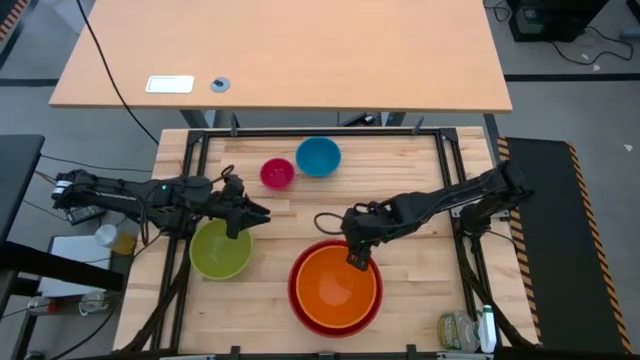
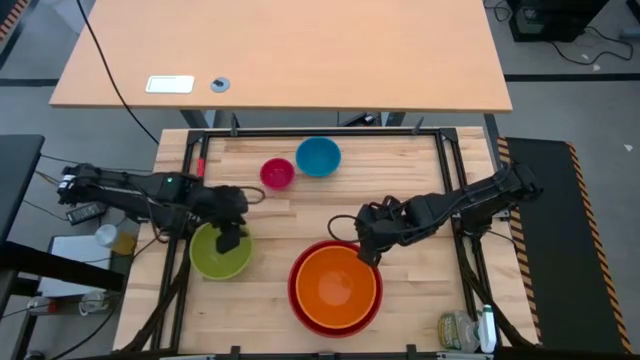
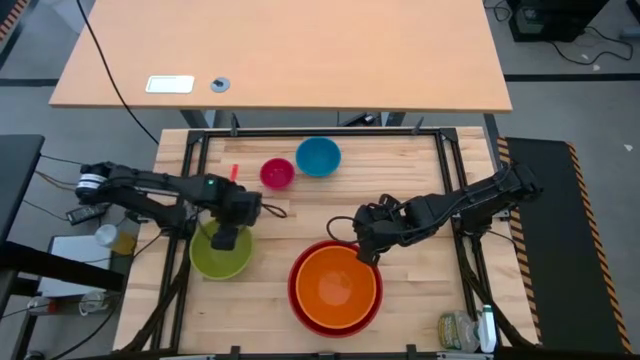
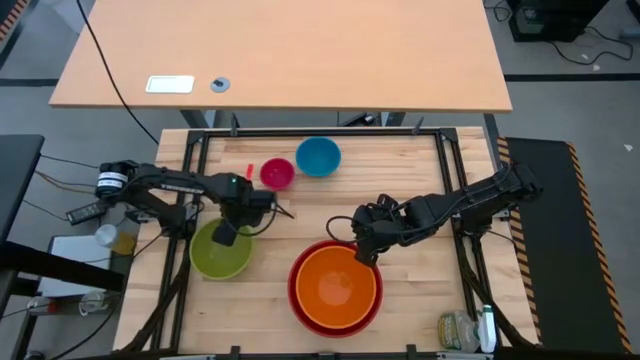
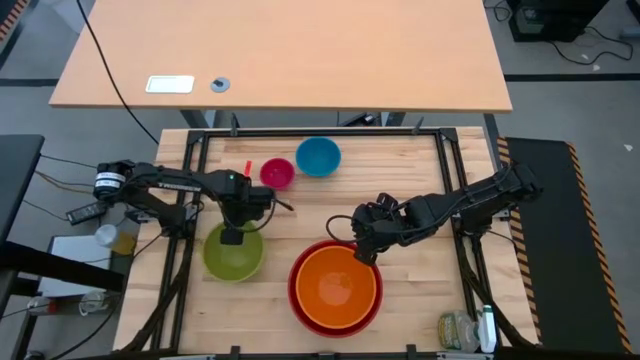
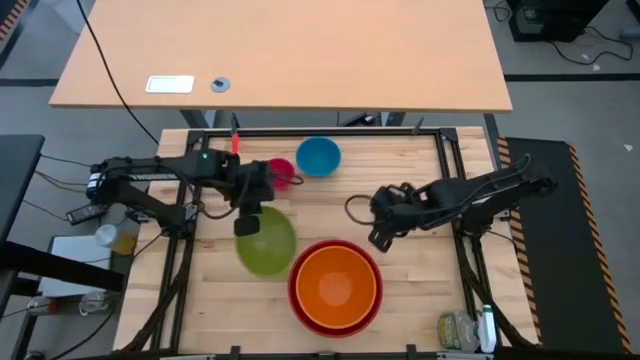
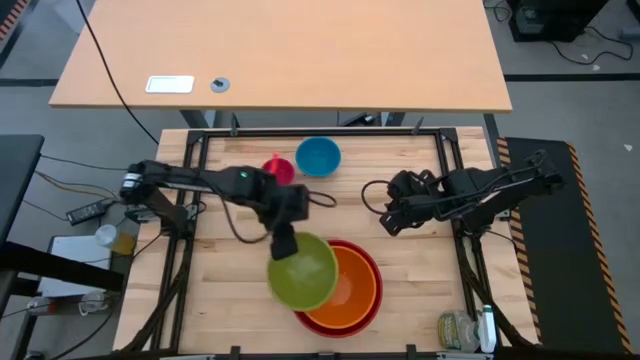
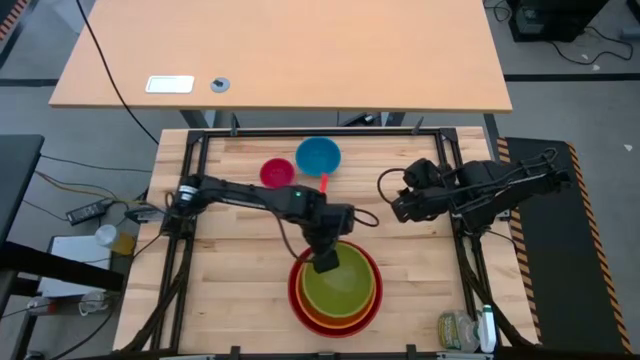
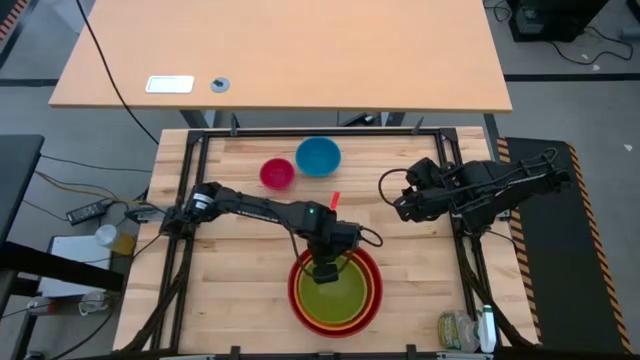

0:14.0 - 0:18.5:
Stack the green bowl on top of the orange bowl

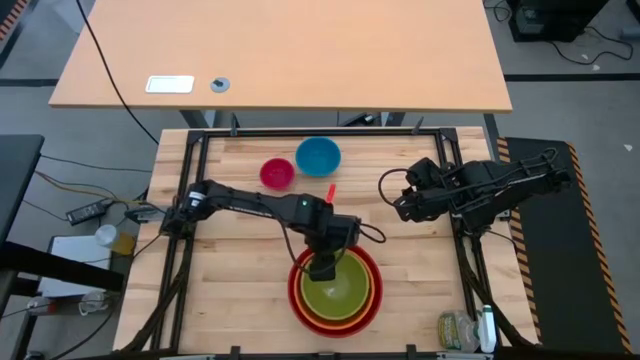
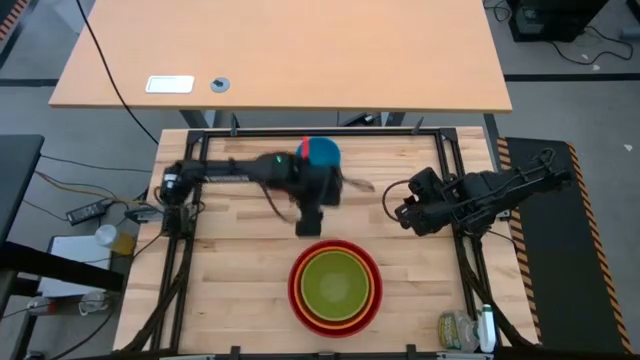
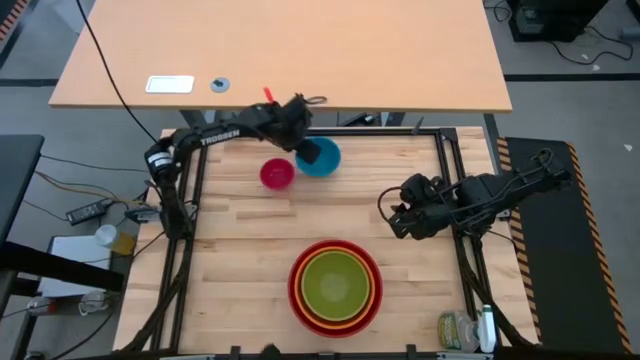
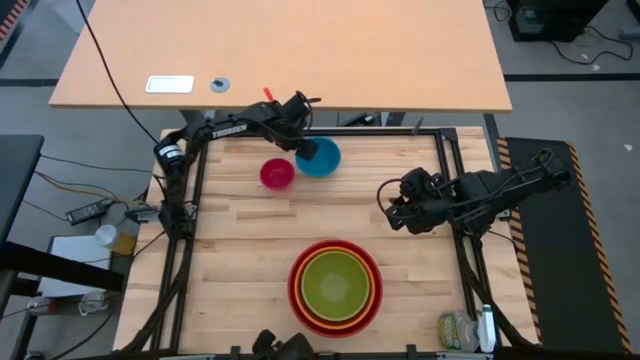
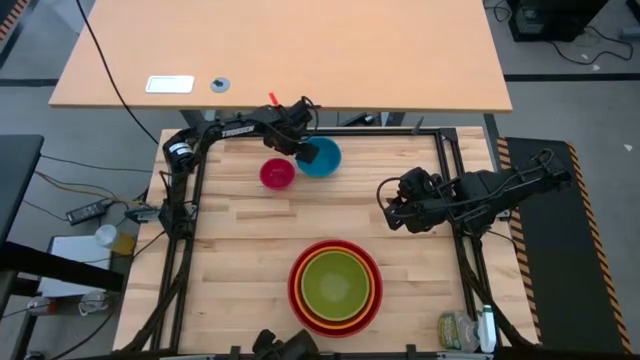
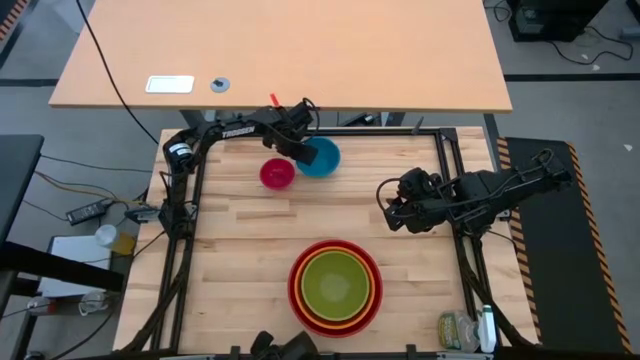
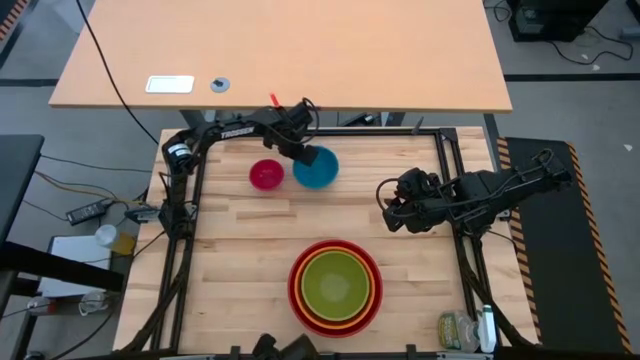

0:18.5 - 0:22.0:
Stack the blue bowl on top of the green bowl

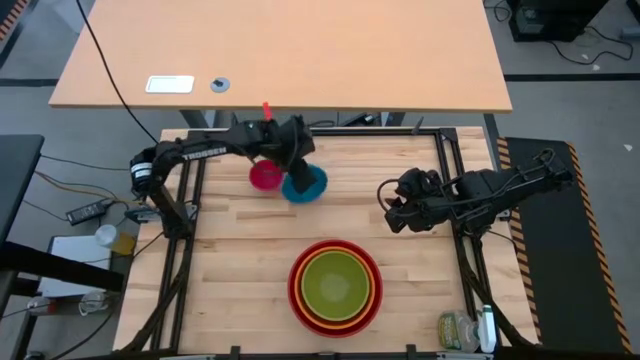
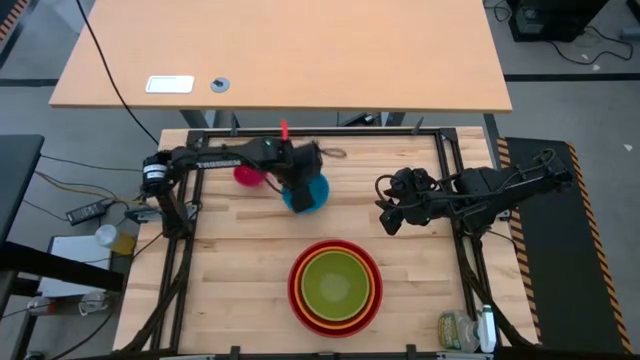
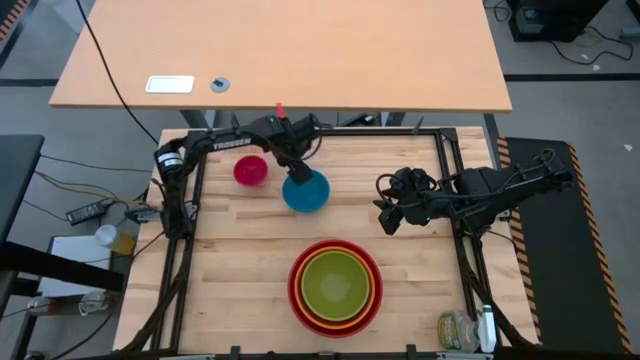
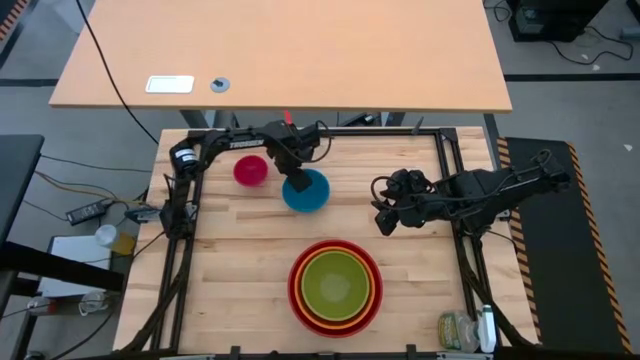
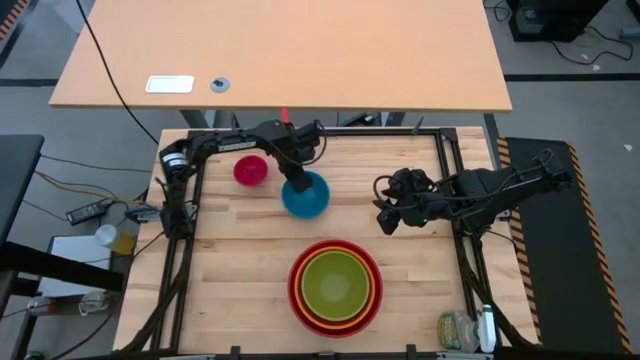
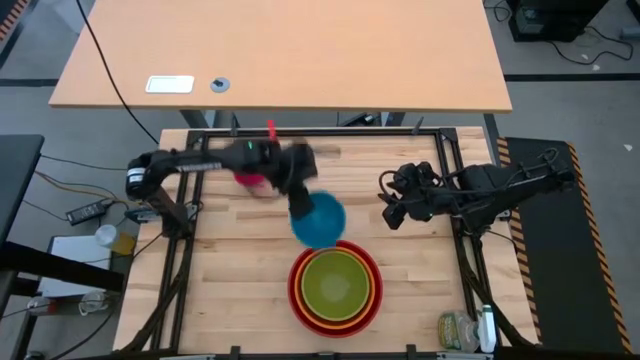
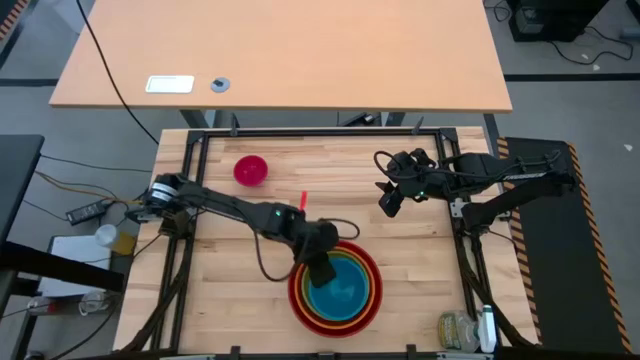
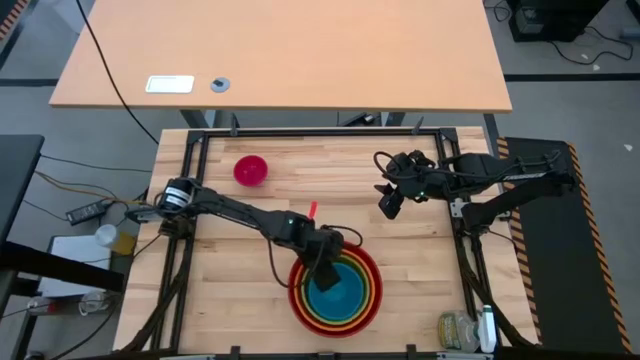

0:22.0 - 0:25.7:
Stack the blue bowl on top of the green bowl

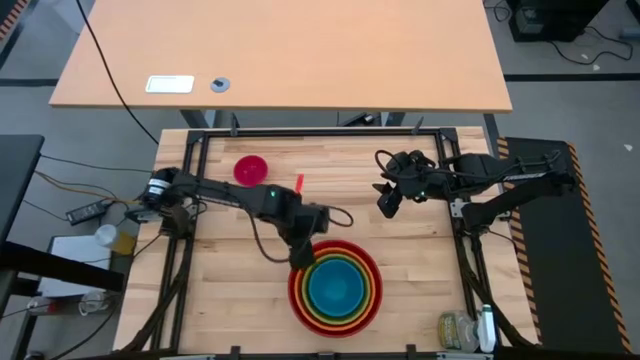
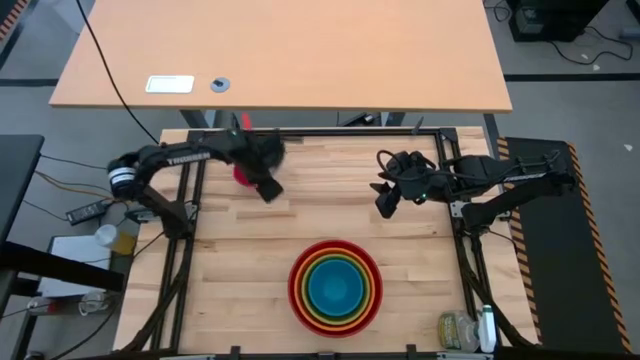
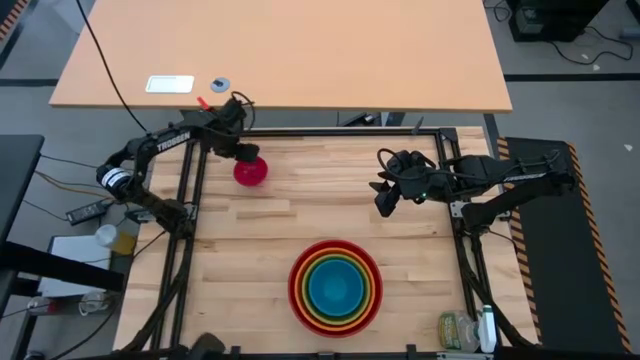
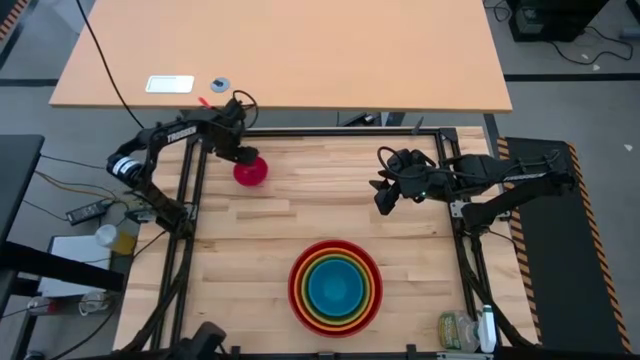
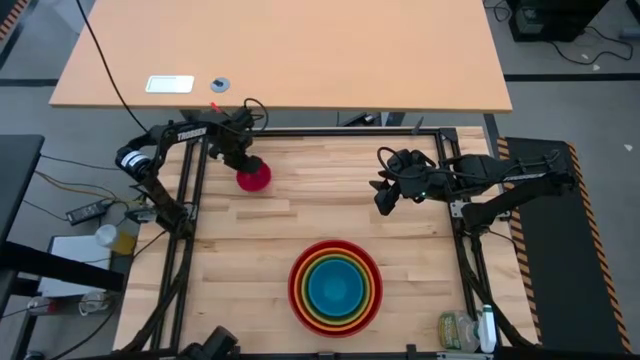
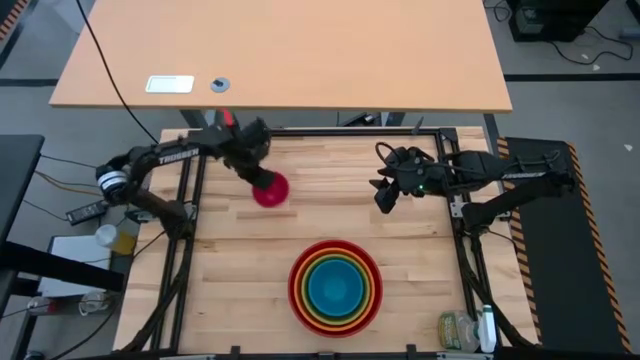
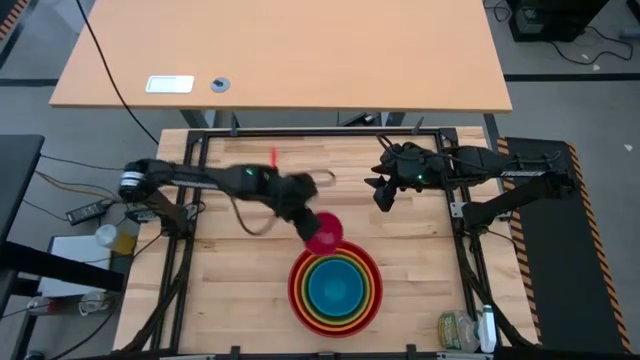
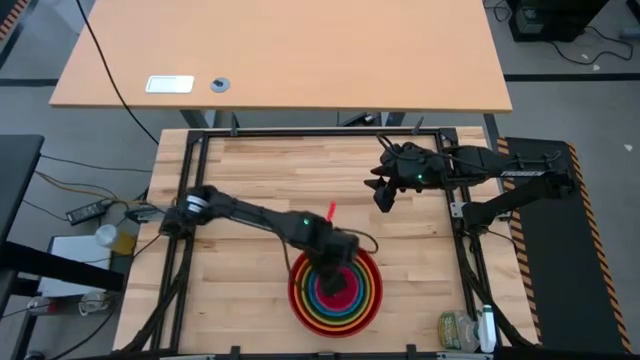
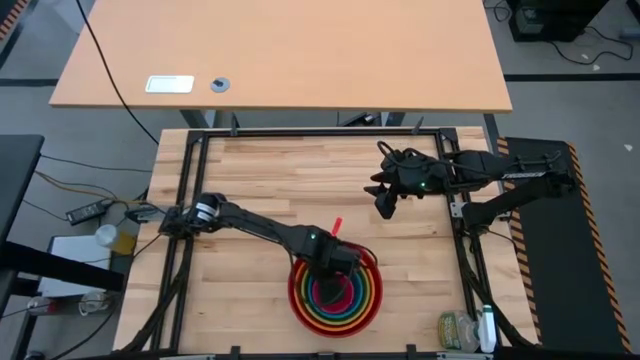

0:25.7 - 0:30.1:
Stack the pink bowl on top of the blue bowl

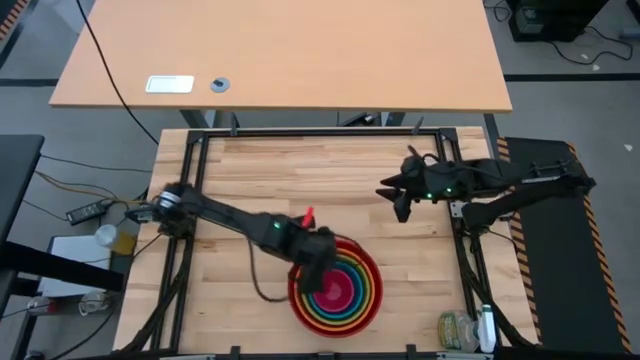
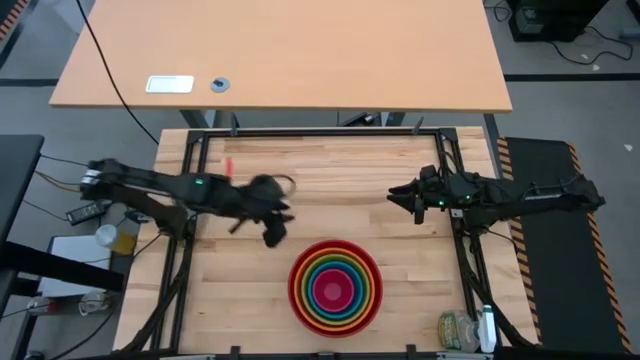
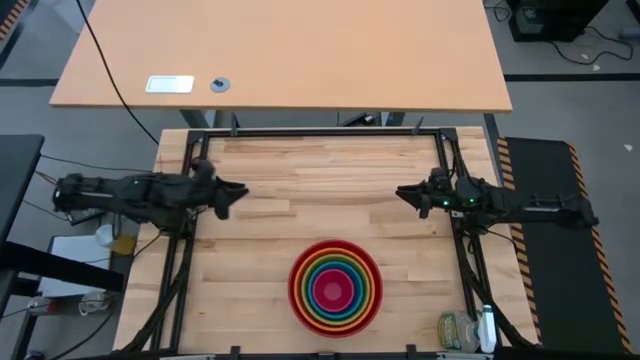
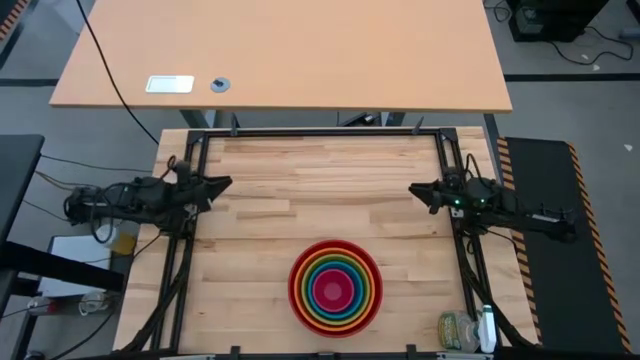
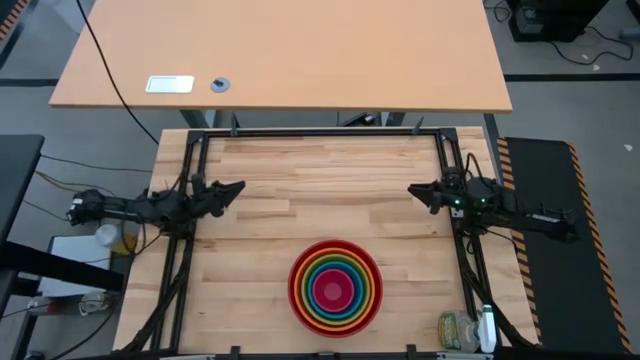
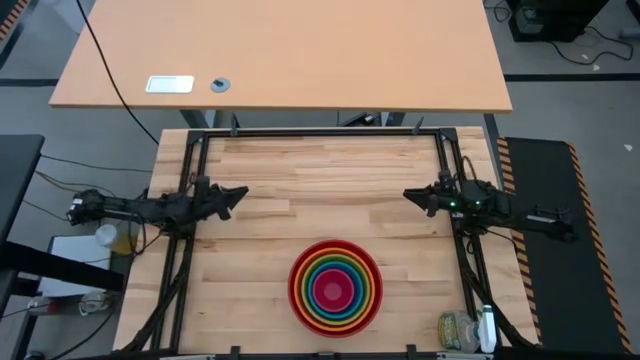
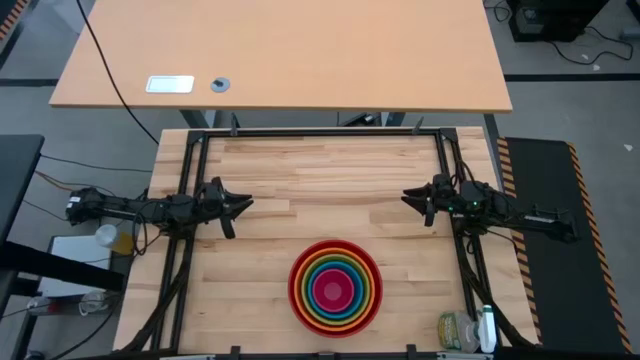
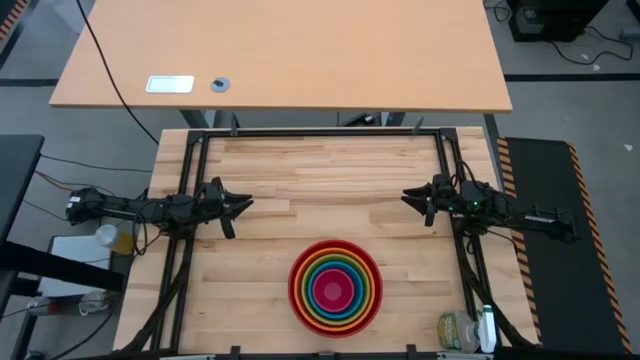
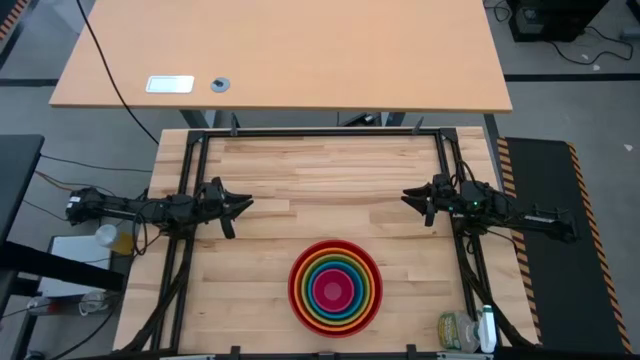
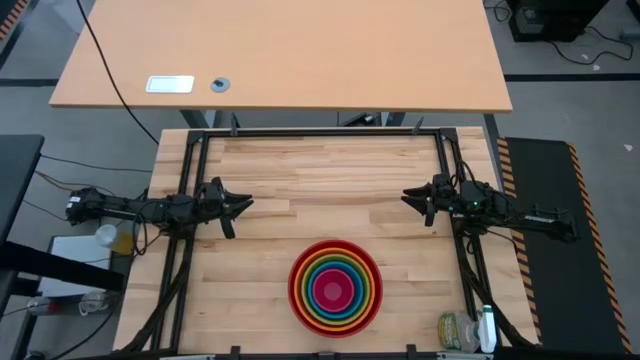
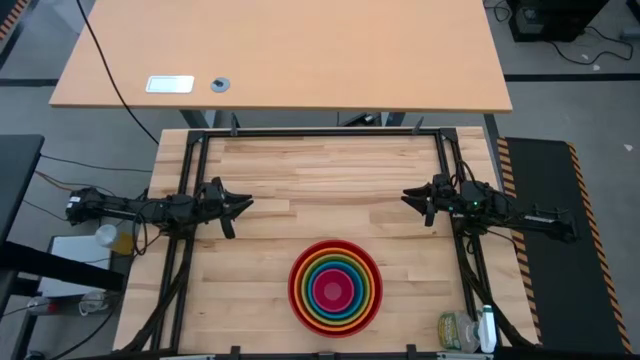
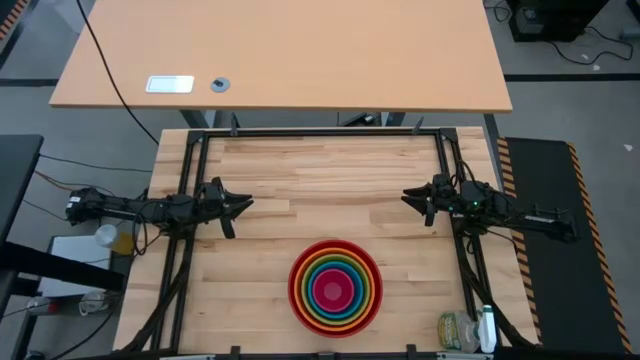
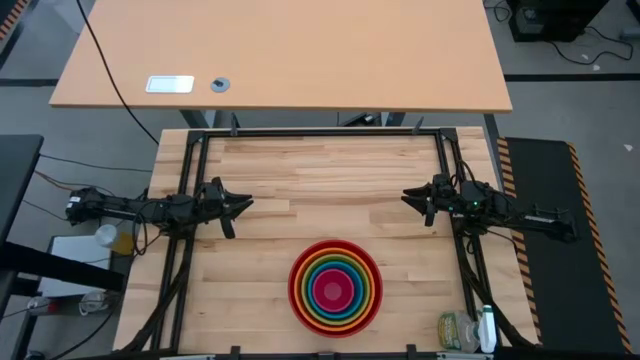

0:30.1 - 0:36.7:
Return to Home Position
